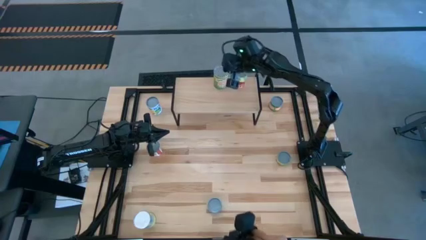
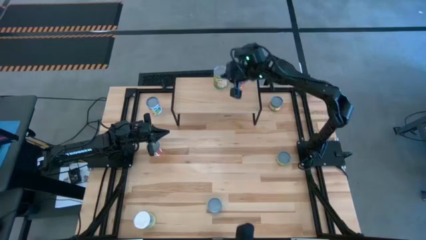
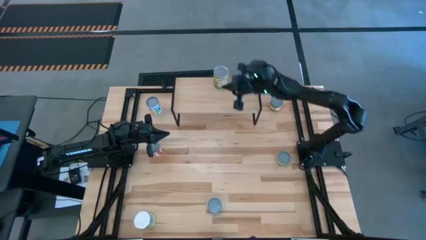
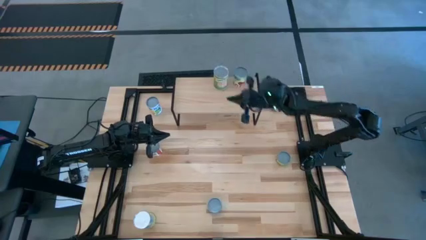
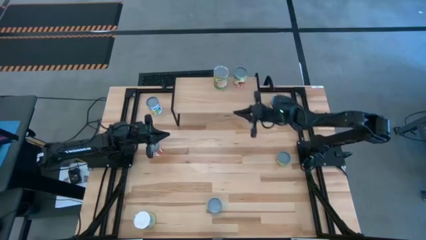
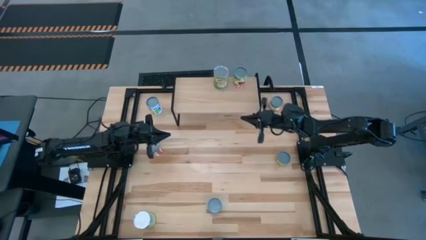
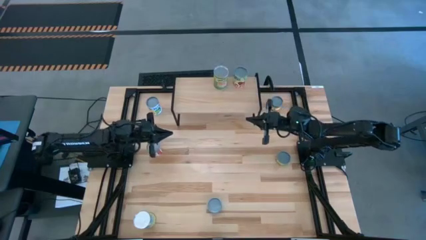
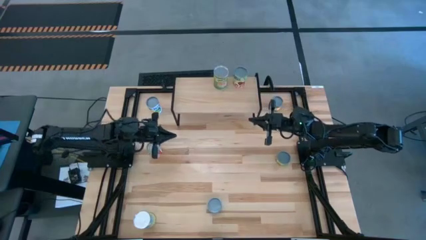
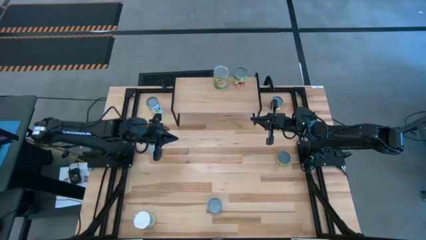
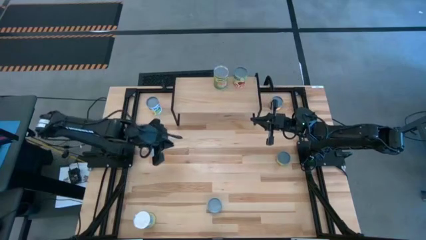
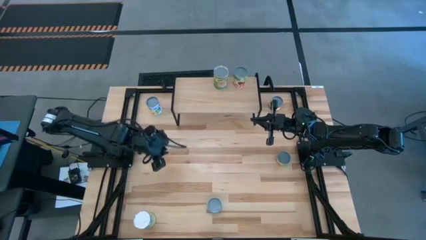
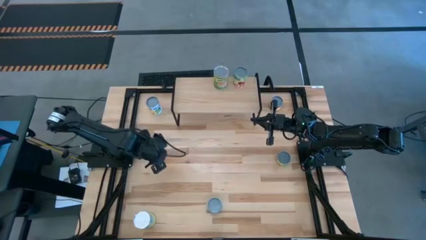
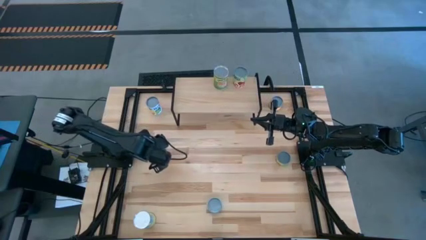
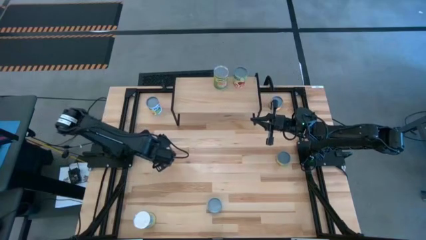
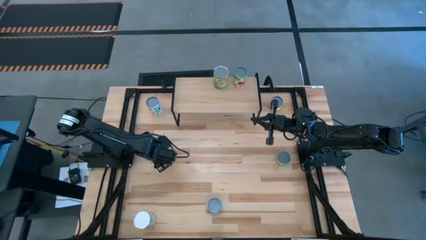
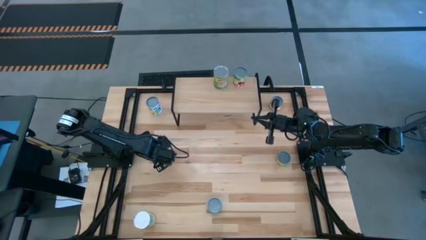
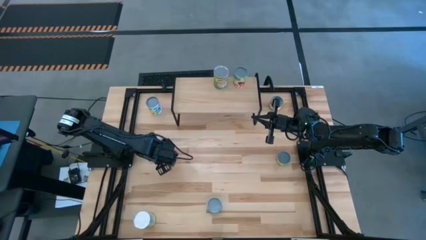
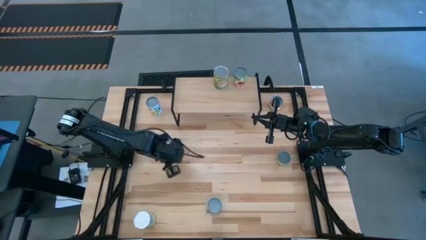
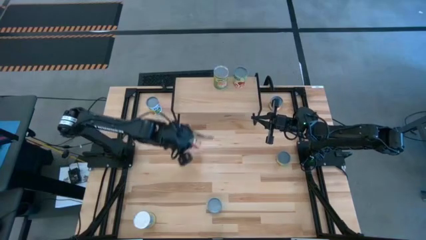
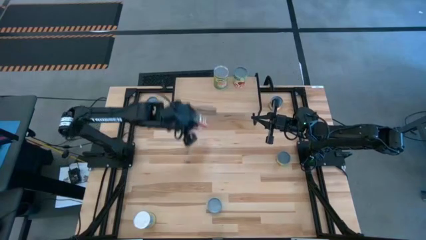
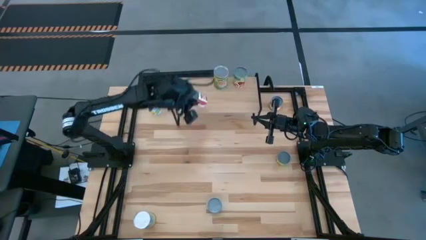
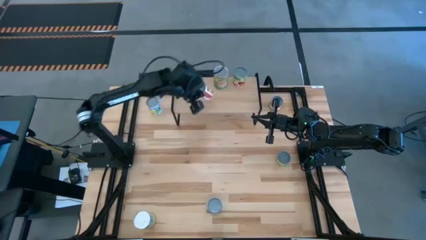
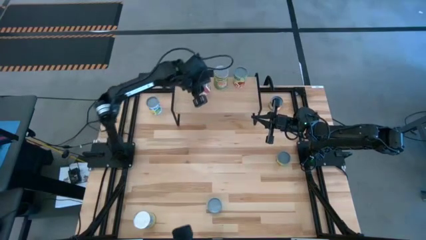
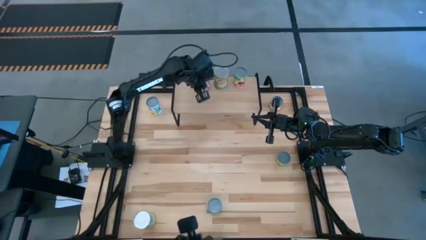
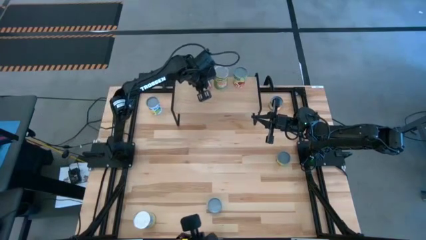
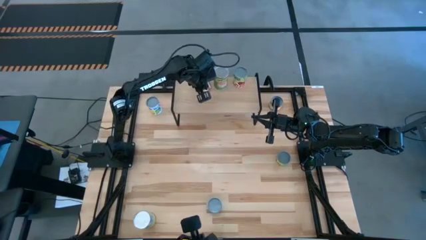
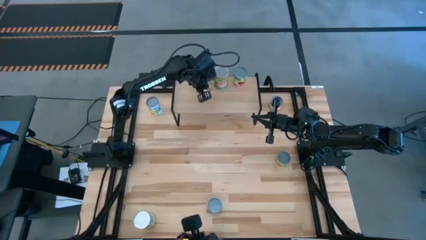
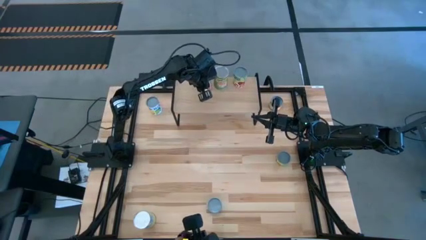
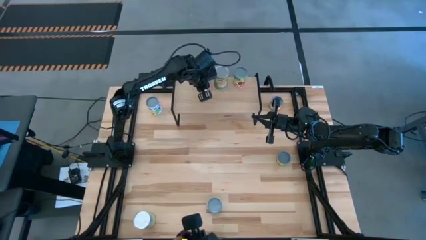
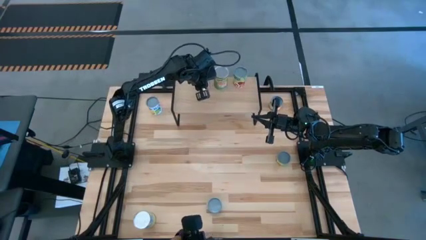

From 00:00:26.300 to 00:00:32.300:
Task: Pick and place cans onto a shelf
Put the canned diced tomatoes on the shelf

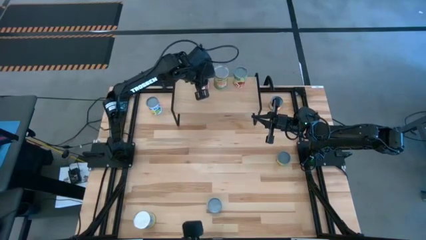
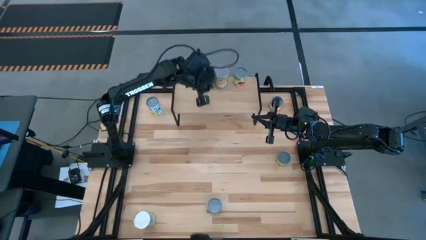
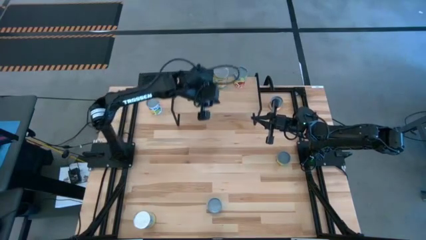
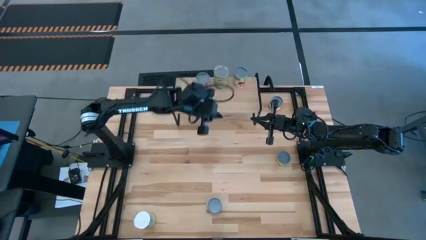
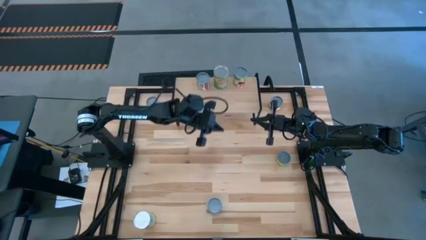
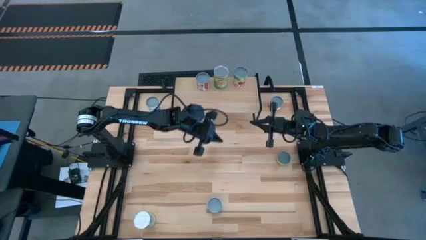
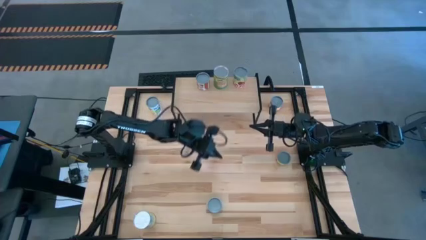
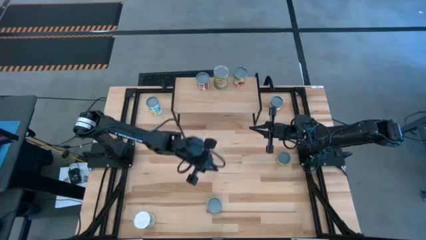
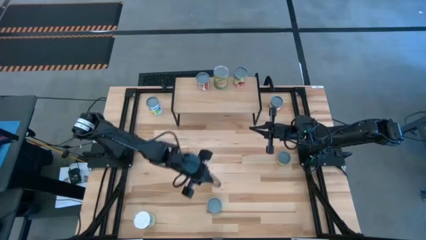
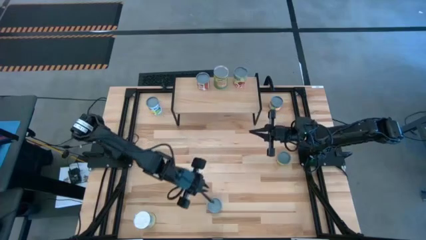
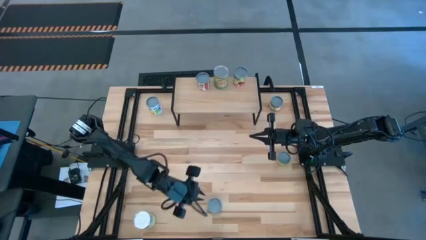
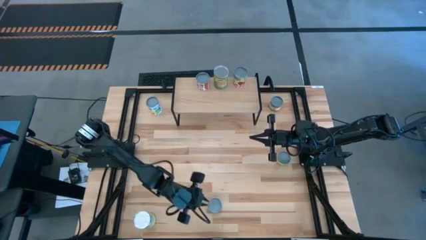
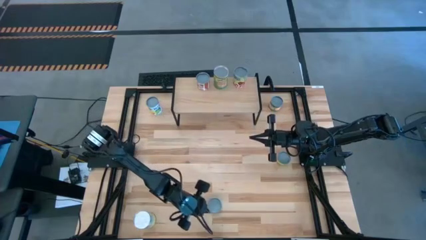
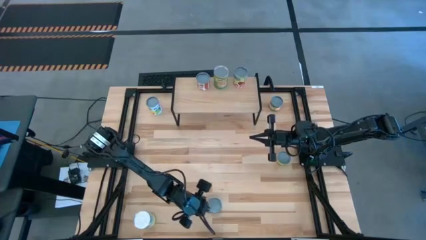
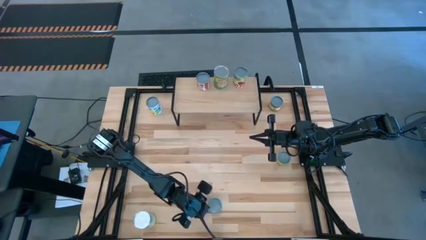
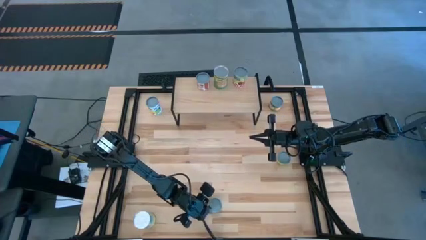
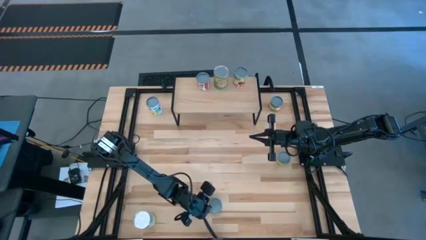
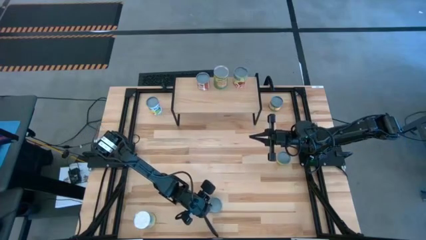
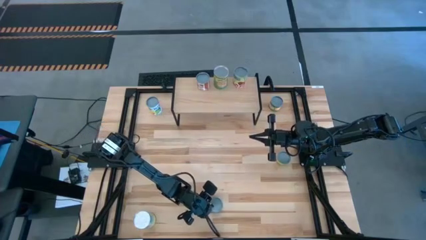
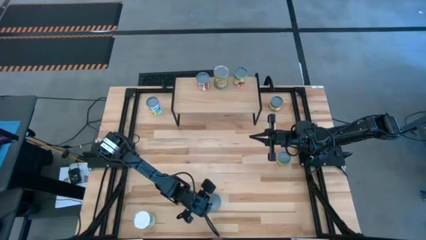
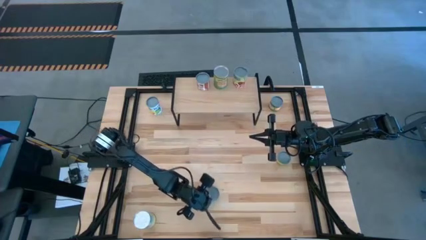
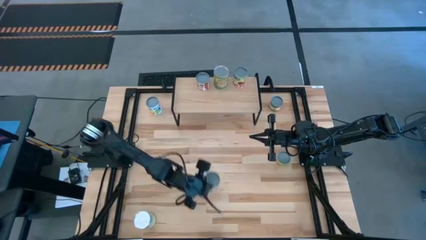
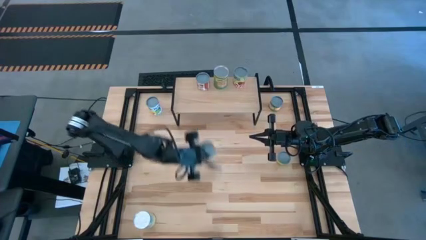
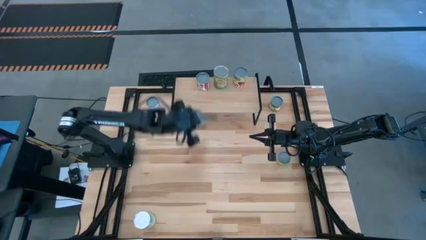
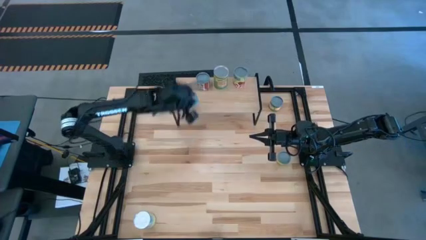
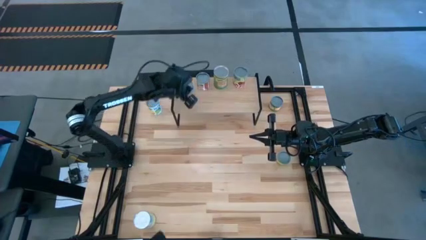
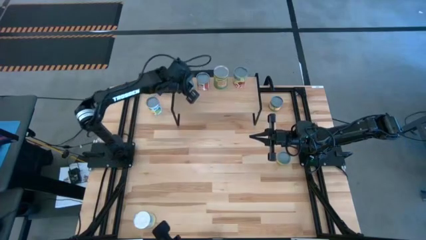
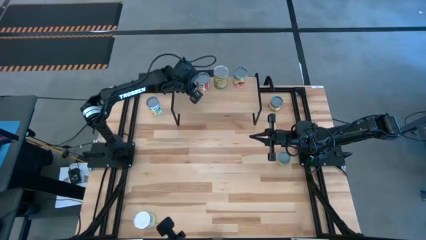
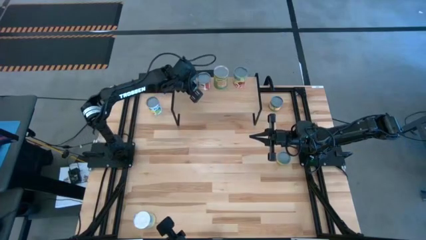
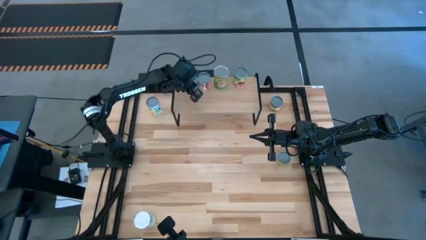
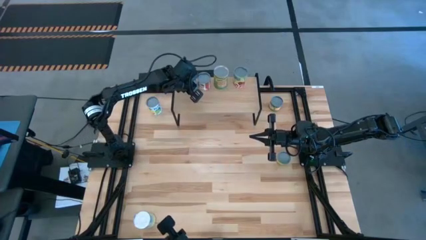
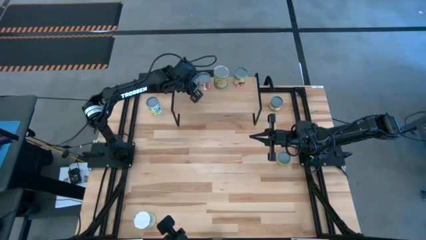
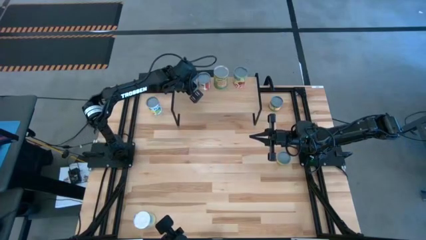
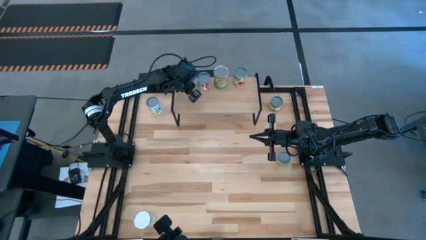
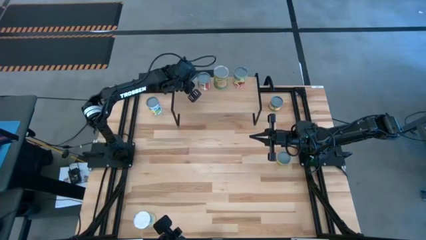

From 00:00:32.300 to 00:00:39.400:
Put the blue tuna can on the shelf

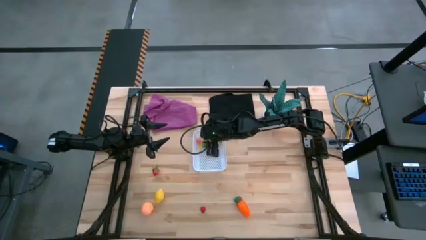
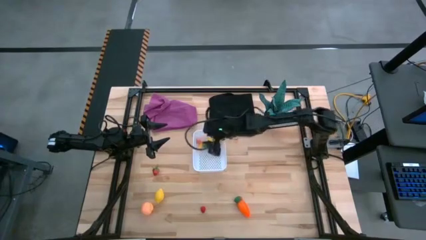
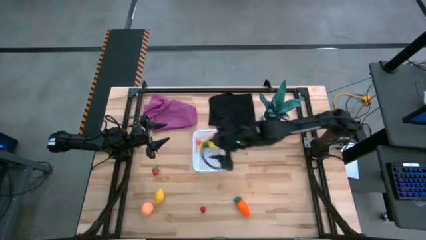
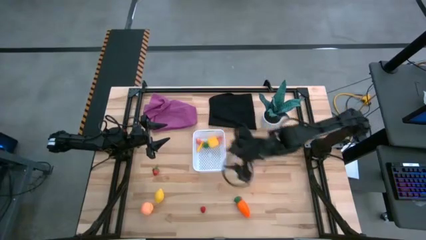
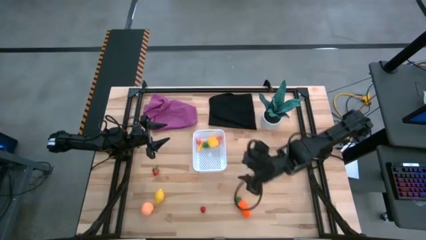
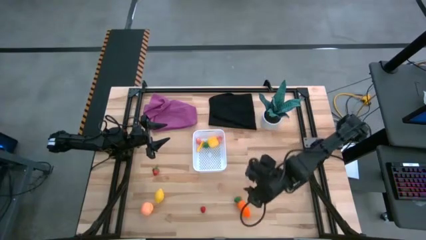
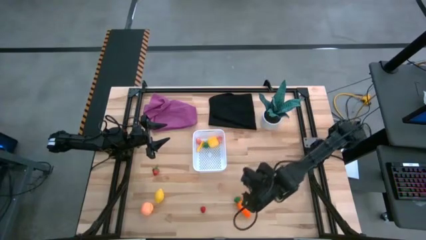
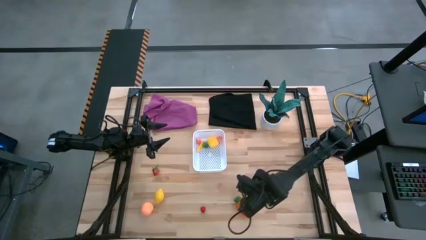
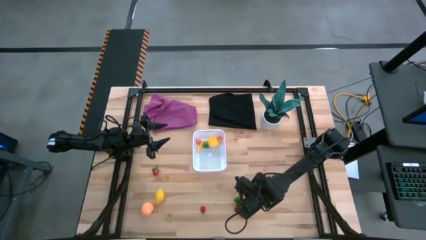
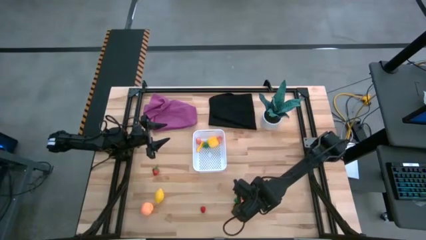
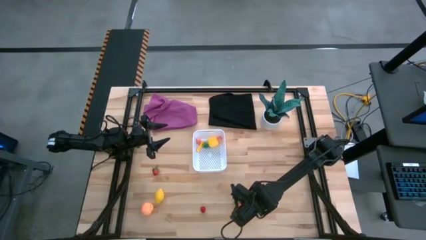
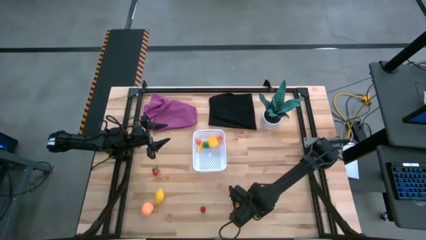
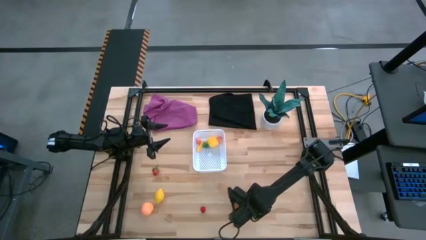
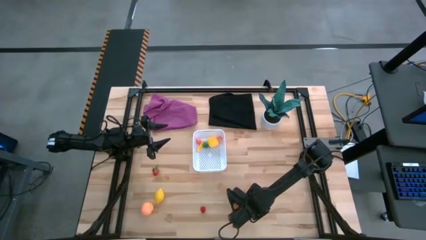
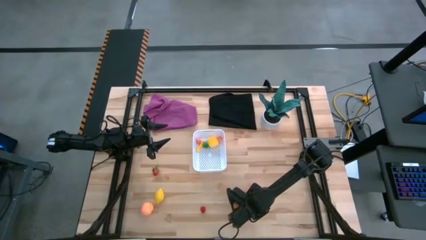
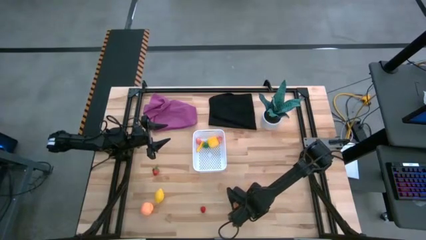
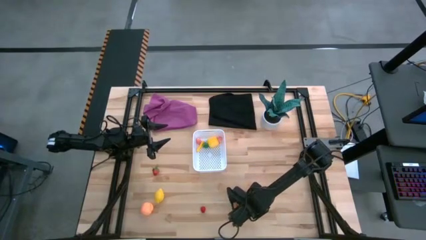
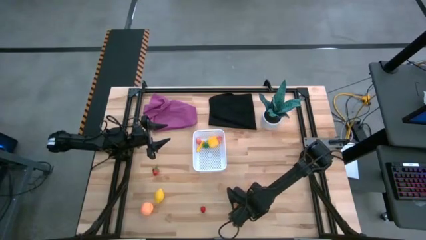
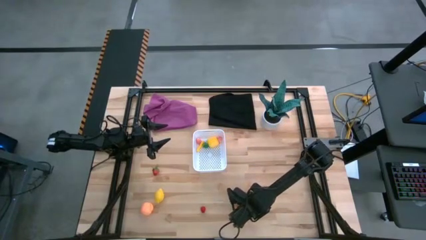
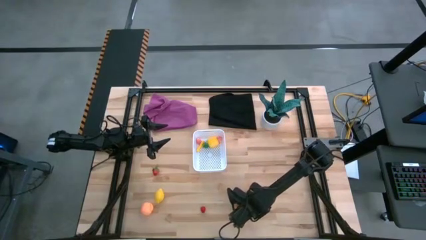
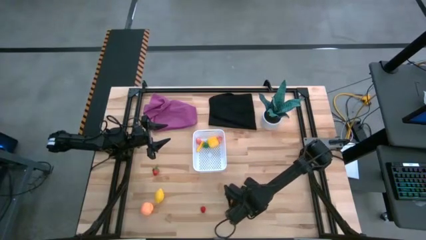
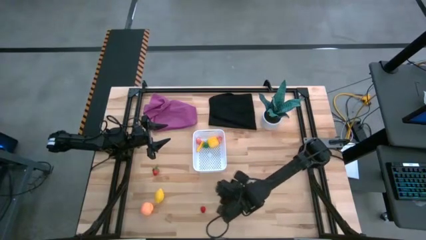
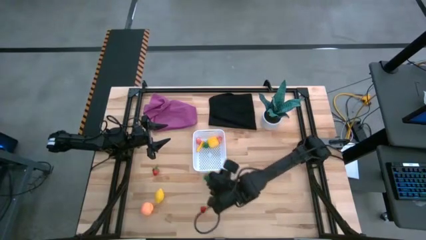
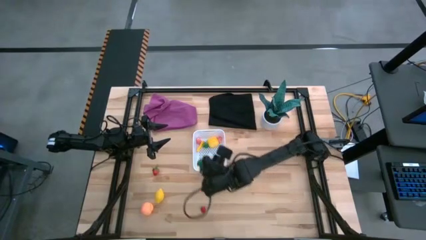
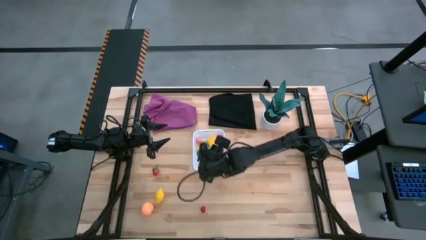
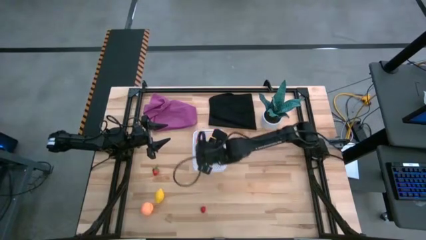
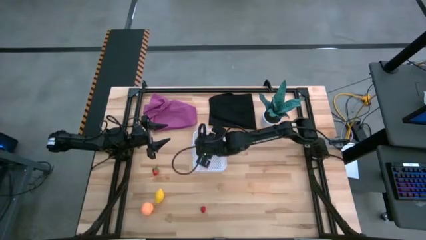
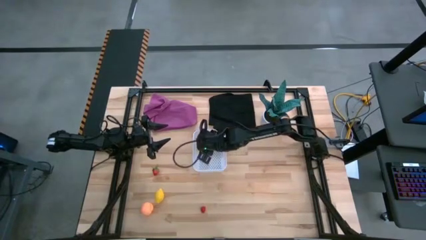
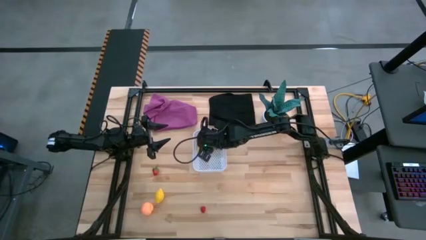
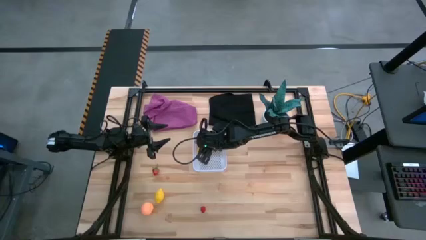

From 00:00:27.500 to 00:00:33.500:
Task: Pick and placing Produce into tupperware
Put the orange carrot into the white bin
